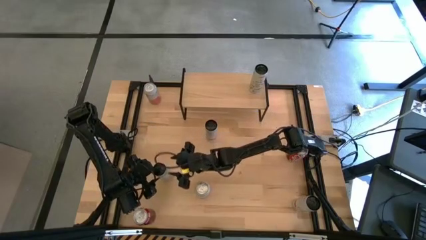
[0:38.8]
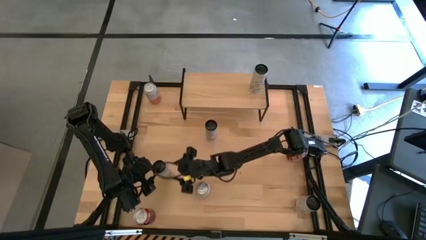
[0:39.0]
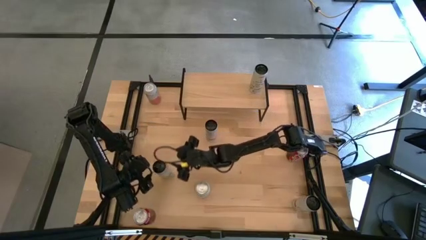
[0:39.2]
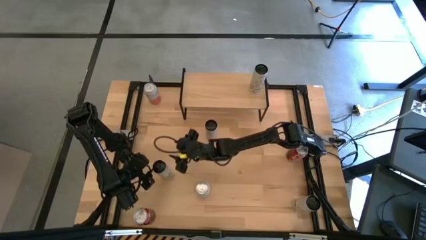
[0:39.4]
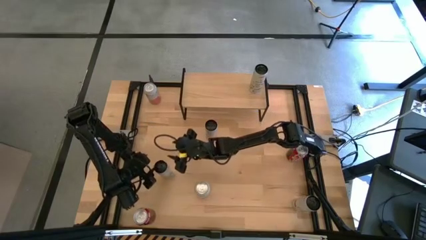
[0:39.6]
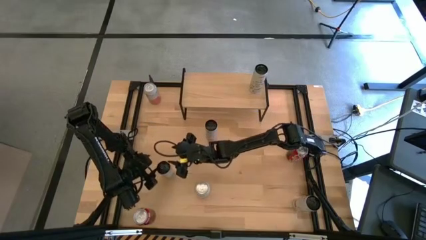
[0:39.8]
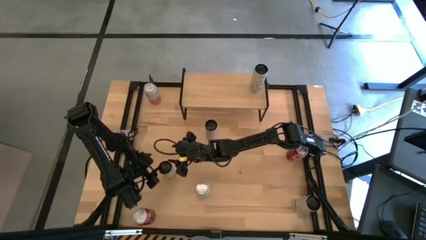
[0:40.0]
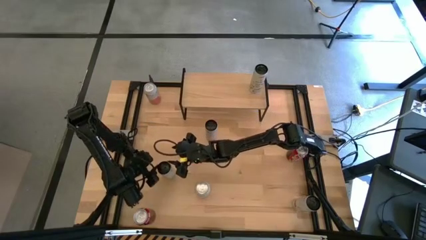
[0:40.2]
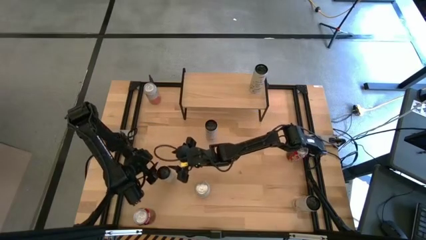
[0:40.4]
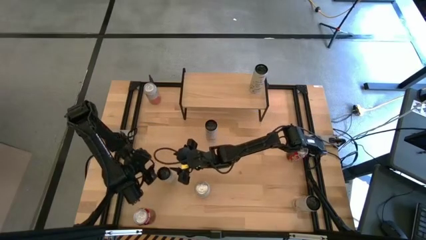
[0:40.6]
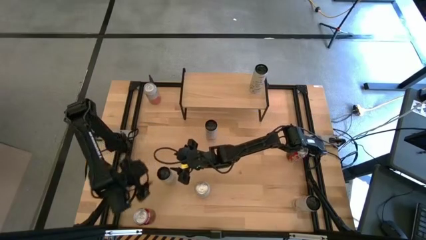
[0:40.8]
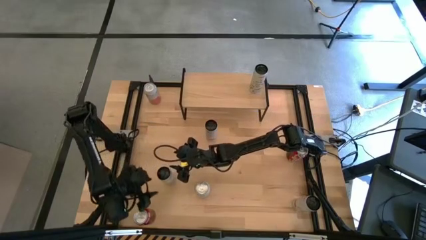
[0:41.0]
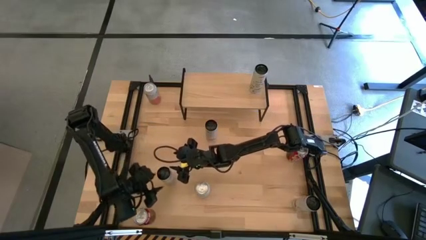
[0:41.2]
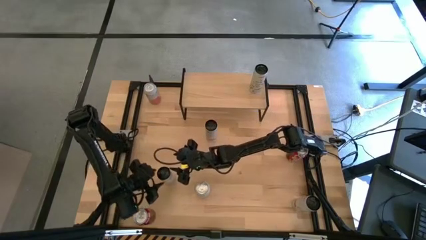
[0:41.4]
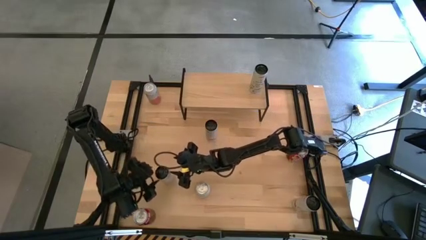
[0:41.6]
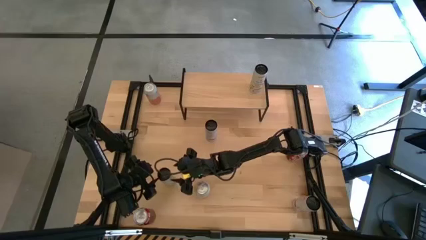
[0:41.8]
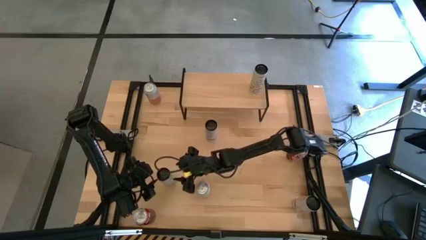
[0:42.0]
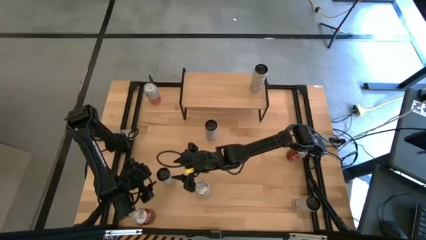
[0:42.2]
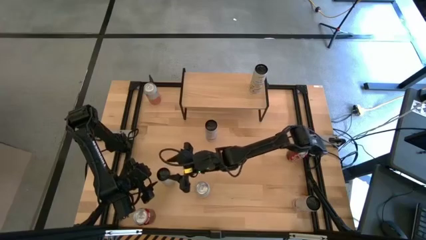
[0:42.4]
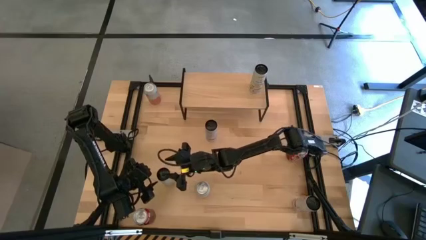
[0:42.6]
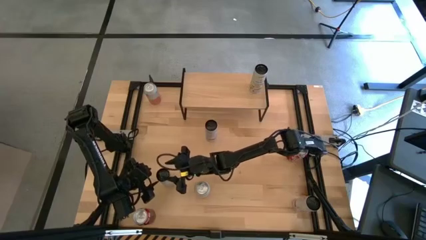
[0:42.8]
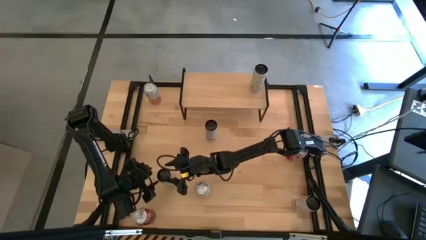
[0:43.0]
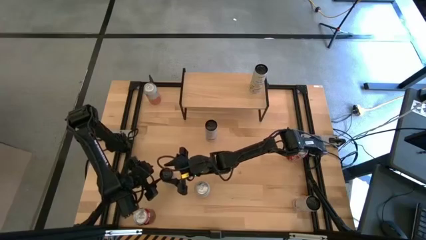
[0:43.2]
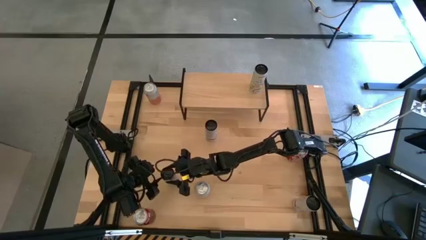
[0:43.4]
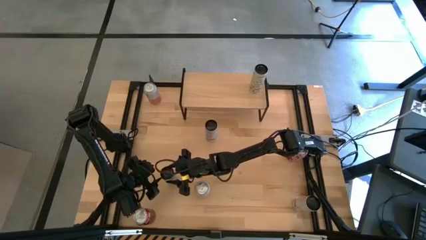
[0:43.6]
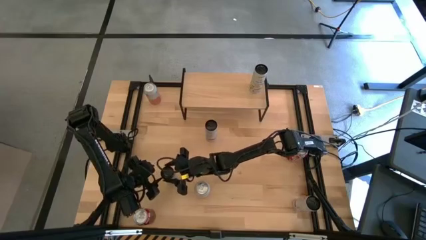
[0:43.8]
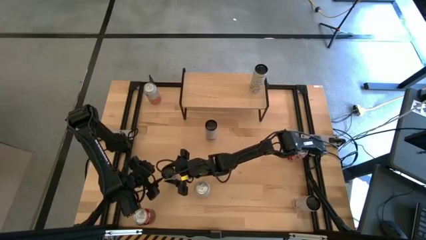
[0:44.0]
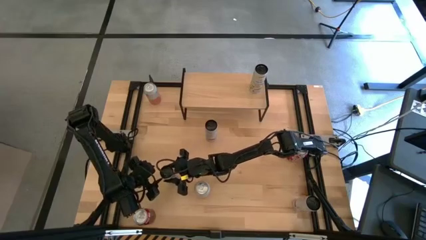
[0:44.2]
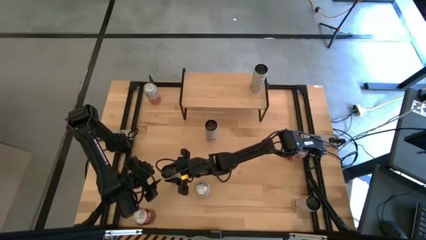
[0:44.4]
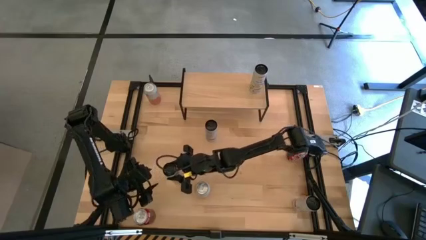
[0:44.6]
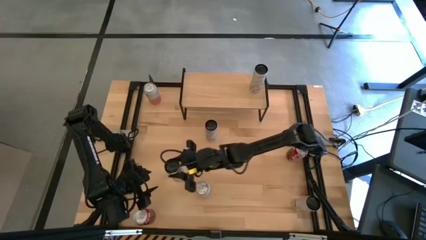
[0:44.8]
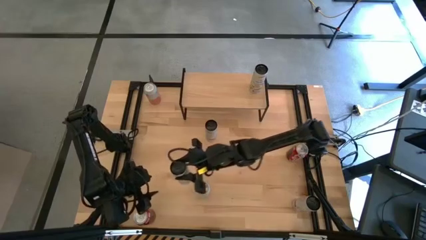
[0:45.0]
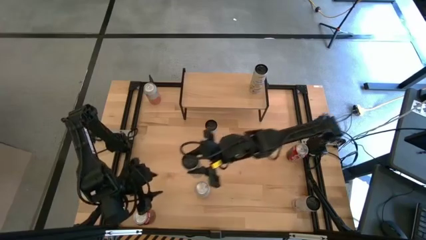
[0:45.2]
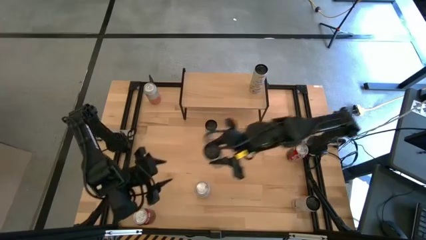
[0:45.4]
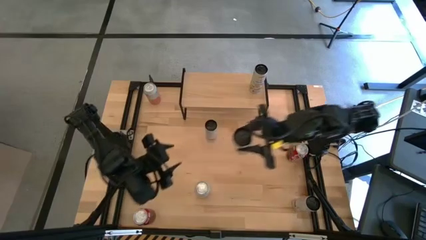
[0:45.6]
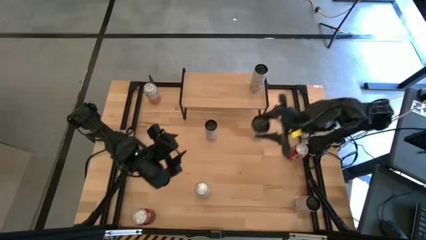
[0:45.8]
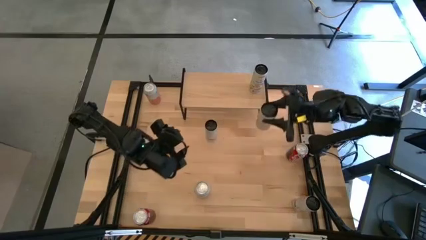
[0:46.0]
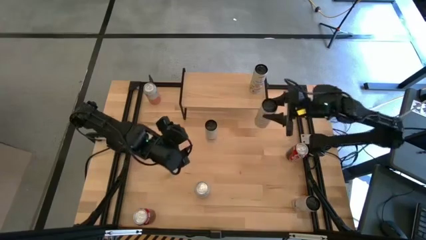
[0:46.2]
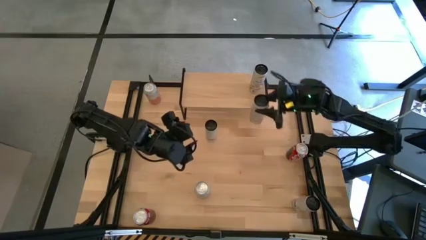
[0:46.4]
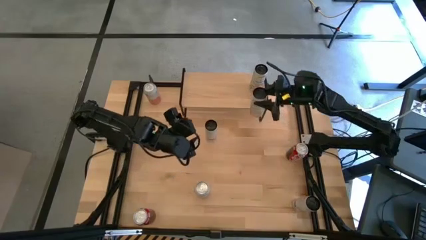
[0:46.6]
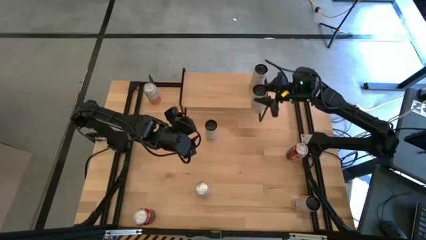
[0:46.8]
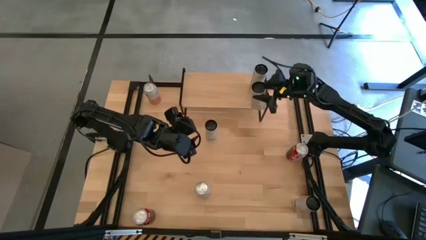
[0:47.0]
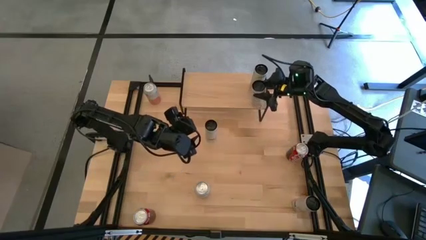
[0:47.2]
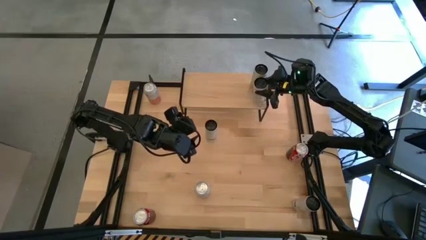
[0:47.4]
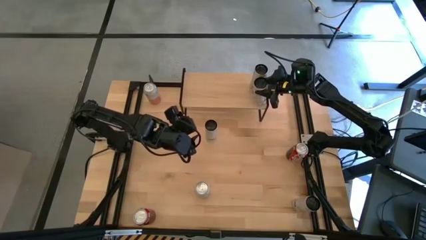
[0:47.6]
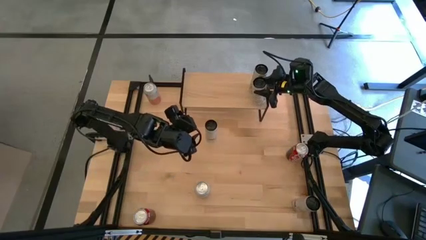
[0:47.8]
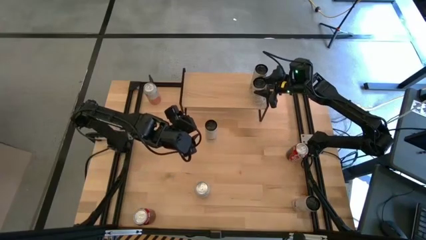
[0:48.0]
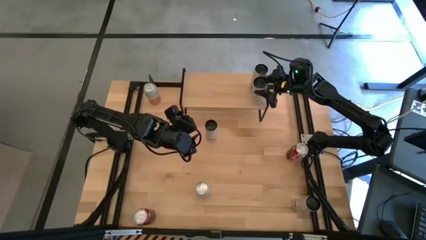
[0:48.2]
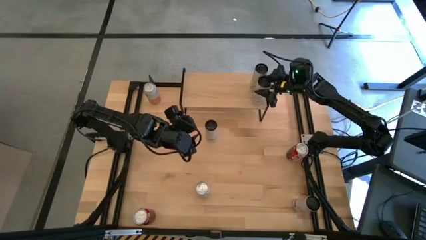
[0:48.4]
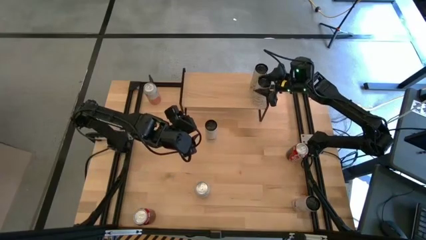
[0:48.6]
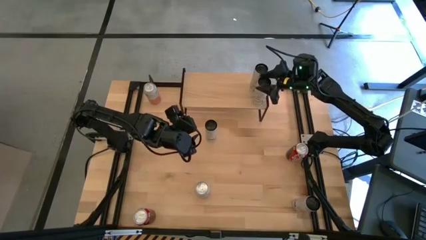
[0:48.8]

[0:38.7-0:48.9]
Task: Place canned beverage on shelf
Put the white and yellow soda can aligned with other white and yellow soda can on the shelf

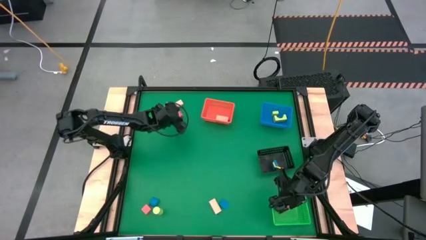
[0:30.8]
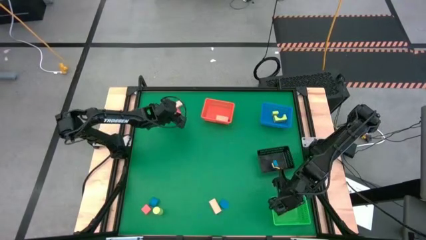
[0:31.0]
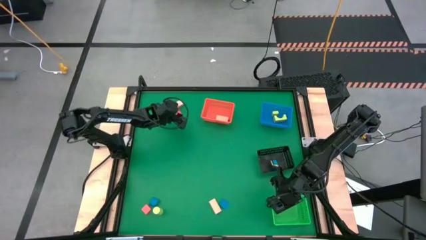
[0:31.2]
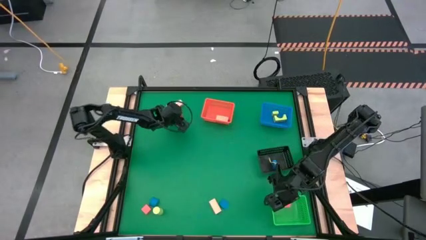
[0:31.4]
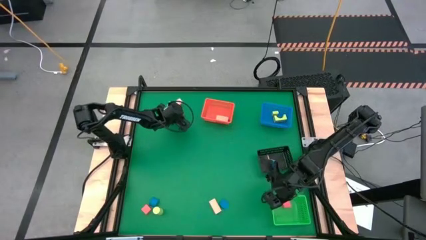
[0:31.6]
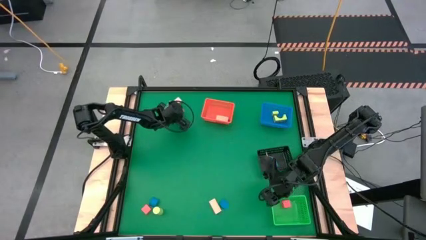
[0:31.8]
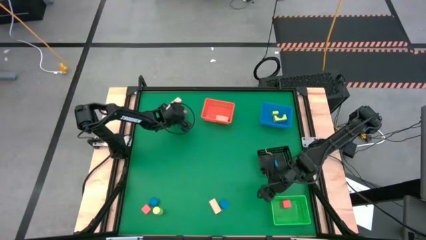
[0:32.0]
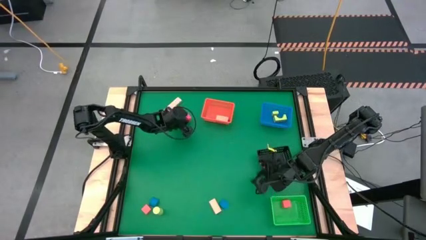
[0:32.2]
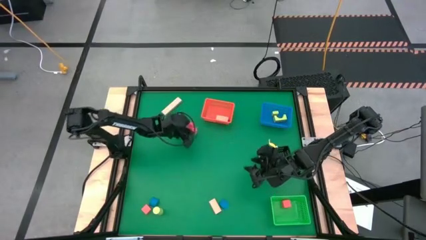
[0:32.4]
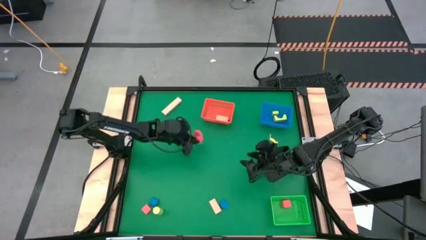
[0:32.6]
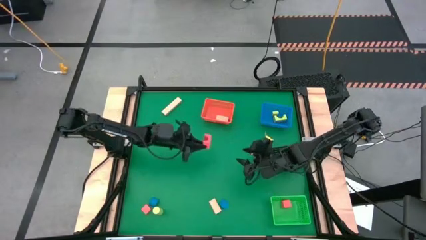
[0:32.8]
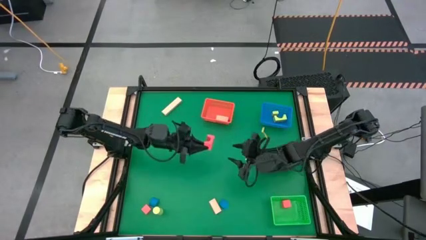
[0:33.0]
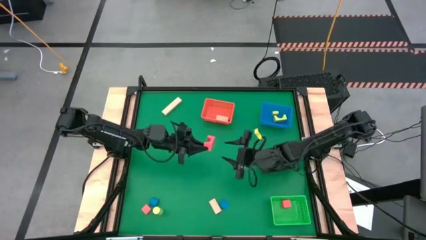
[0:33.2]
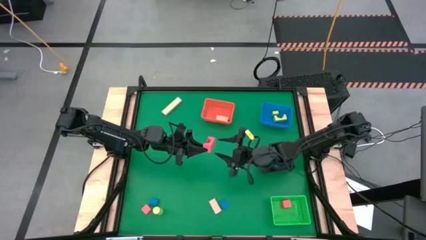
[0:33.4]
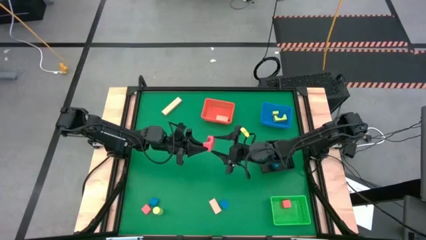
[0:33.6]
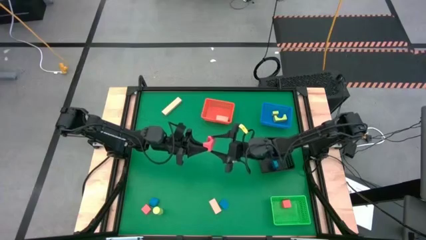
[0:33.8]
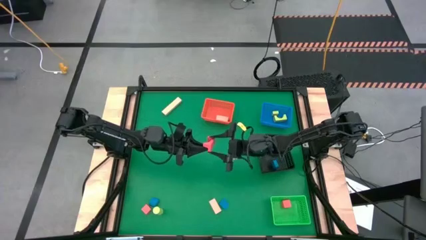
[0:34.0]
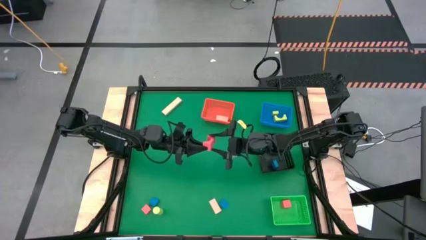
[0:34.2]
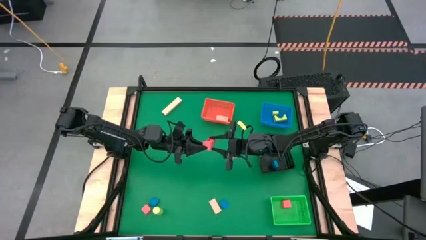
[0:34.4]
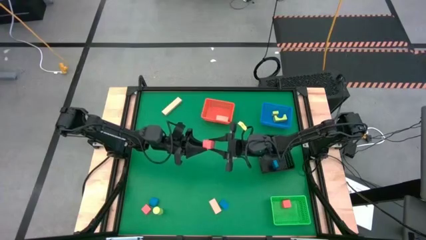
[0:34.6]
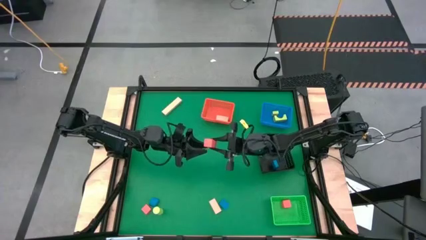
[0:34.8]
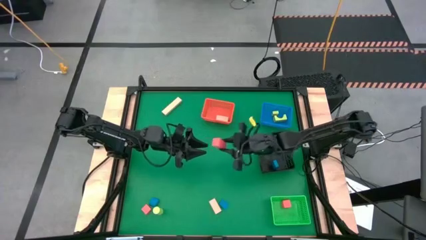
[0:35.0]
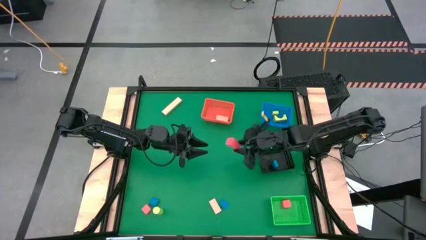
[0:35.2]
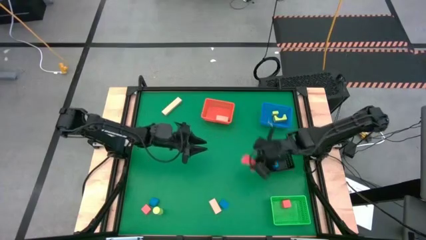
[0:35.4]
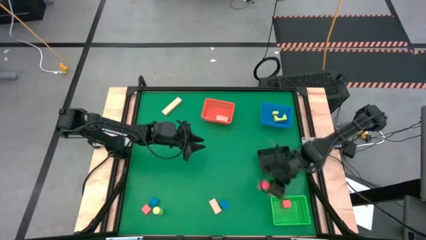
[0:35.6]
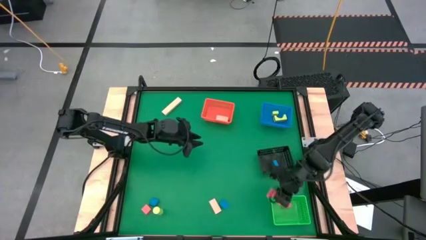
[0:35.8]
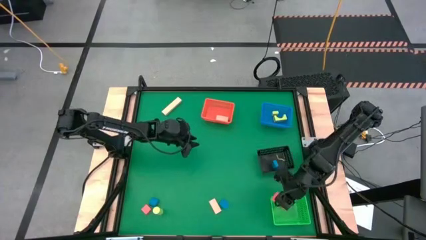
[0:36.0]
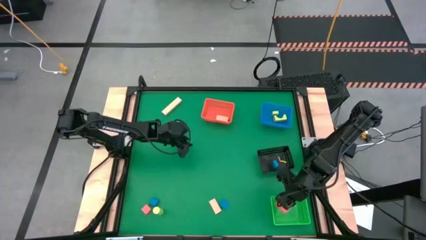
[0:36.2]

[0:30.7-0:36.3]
Task: Sort & place blocks by color
Put the top orange block into the green bin
